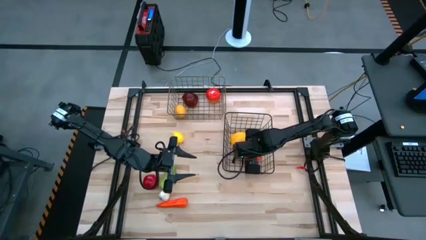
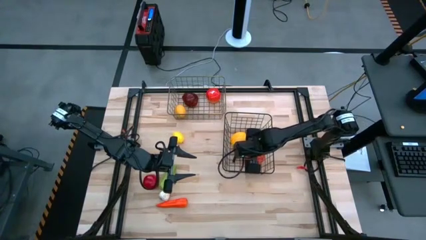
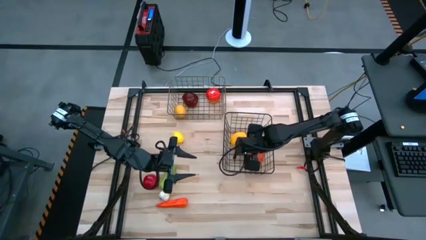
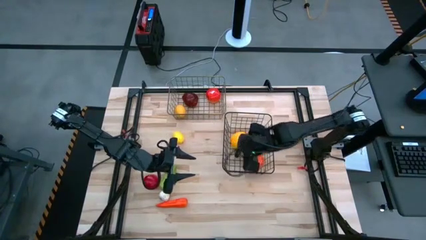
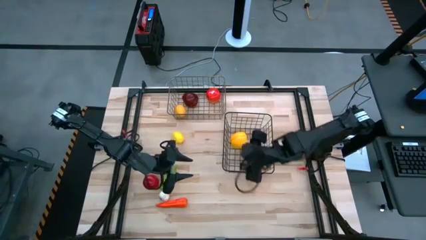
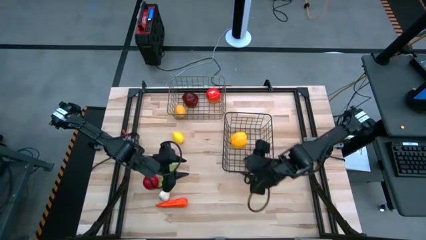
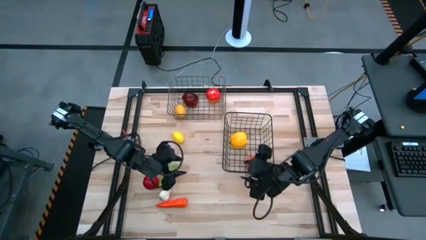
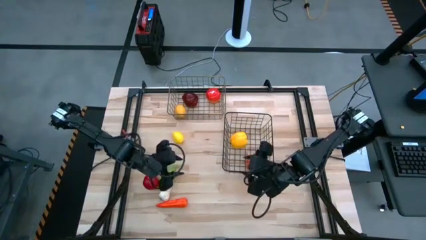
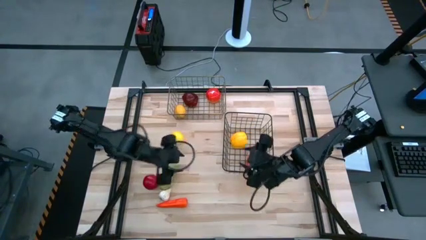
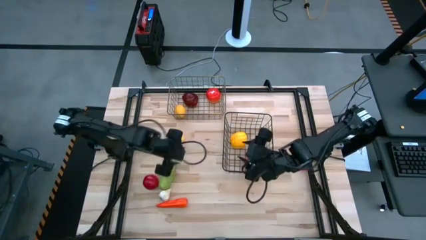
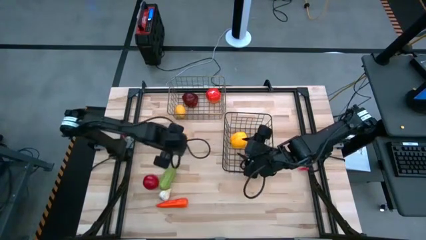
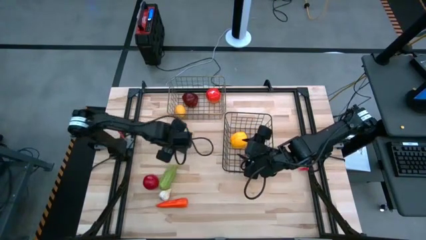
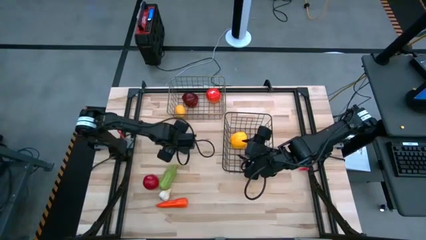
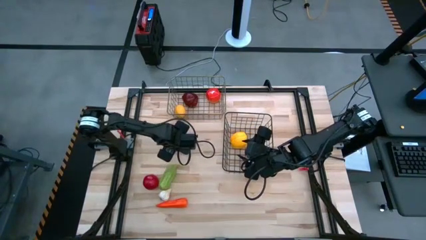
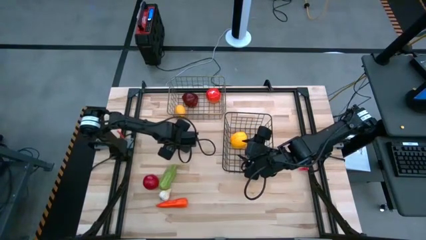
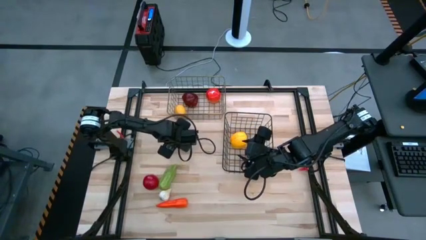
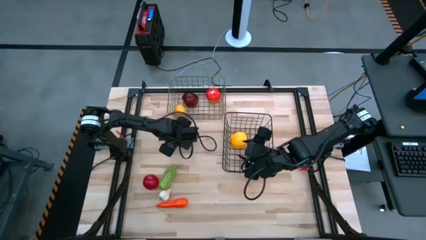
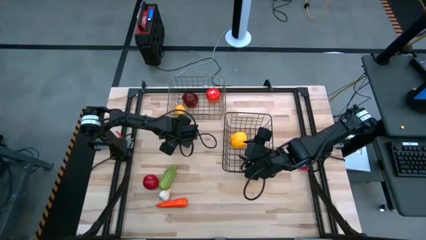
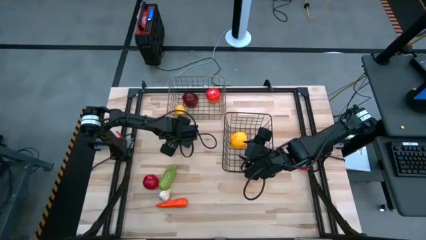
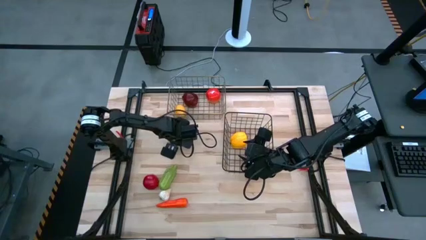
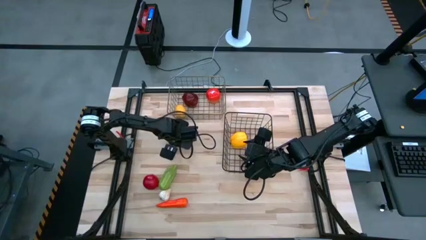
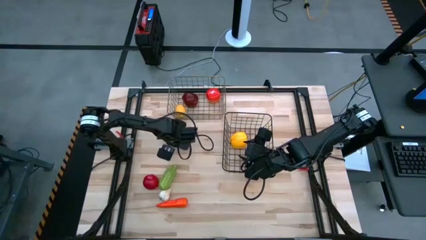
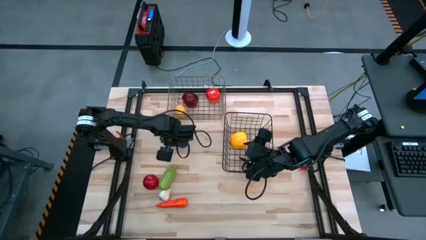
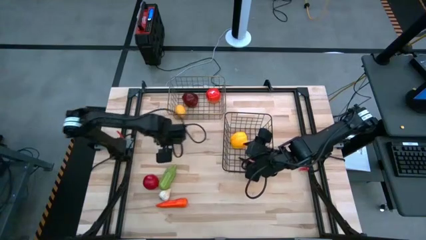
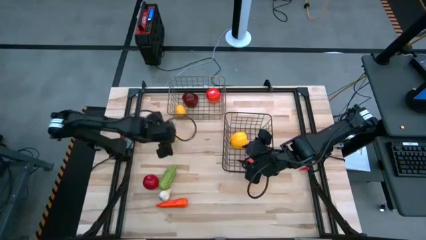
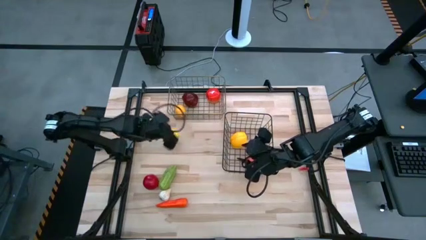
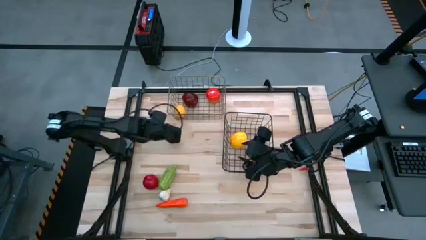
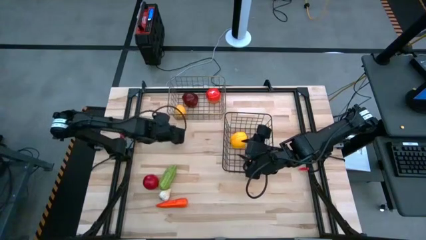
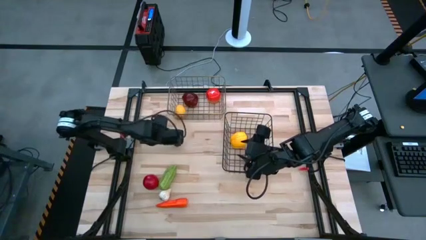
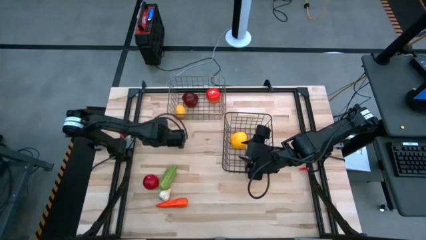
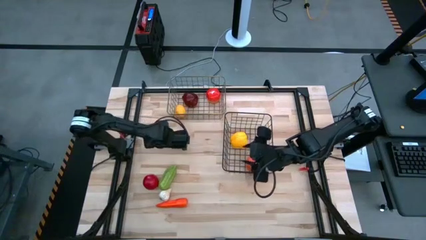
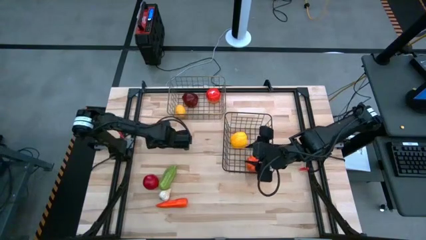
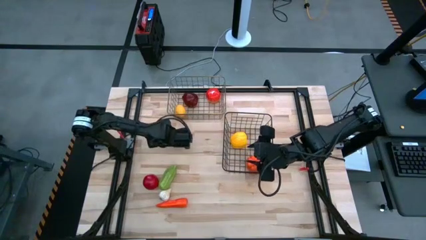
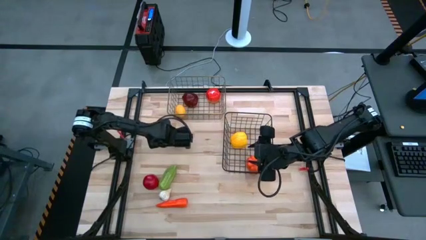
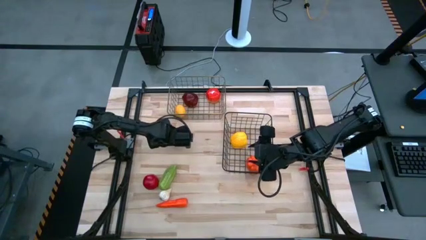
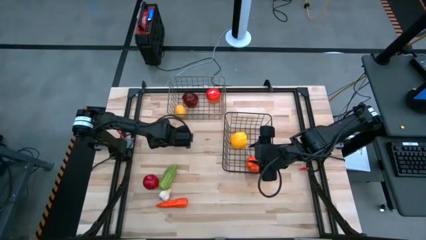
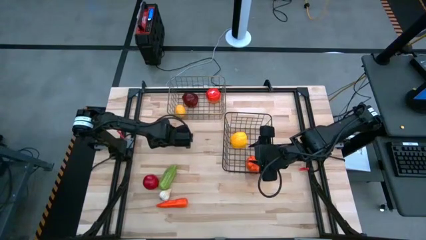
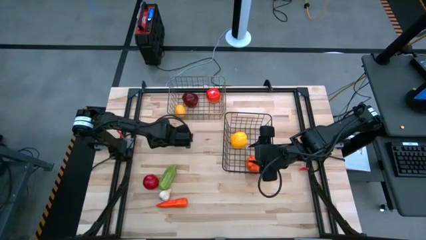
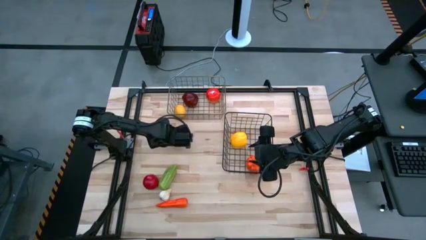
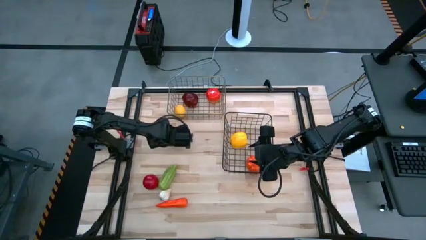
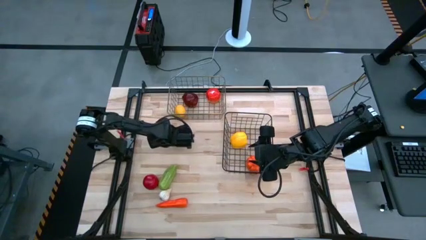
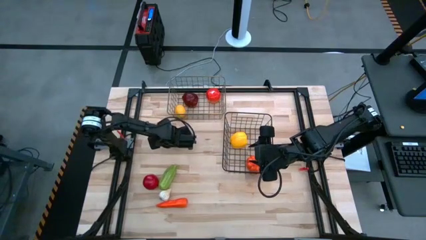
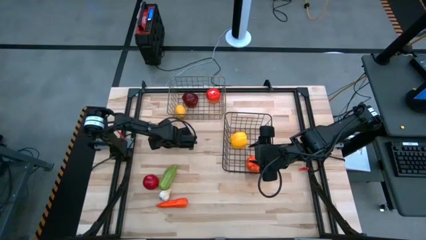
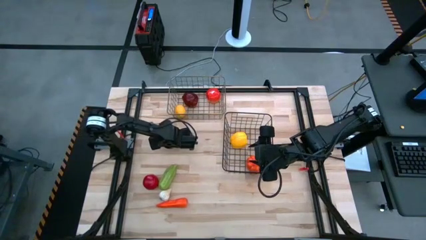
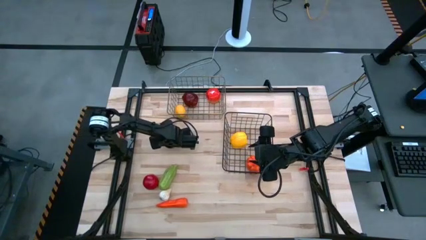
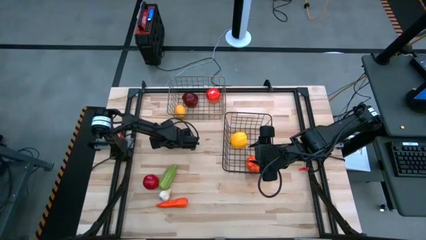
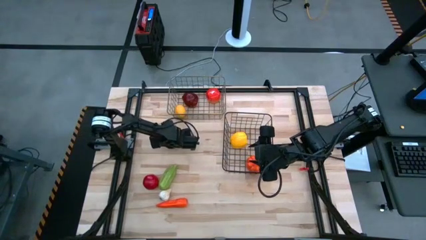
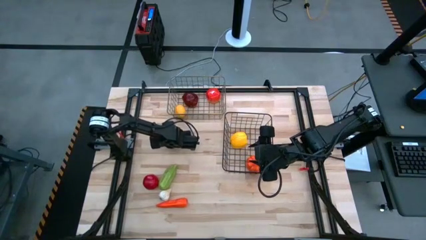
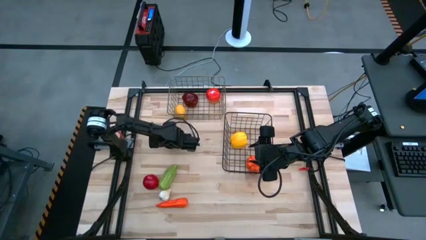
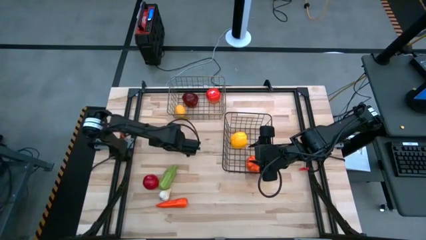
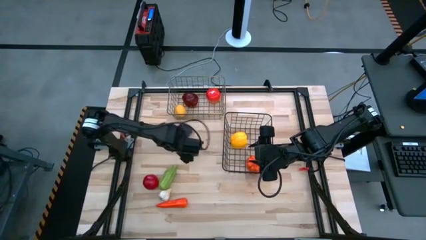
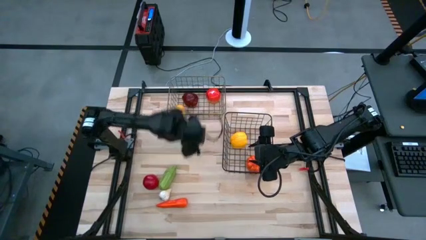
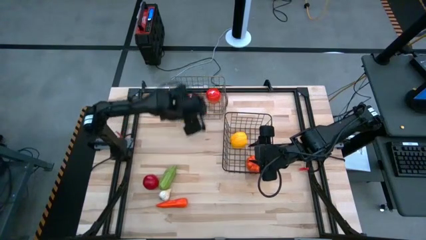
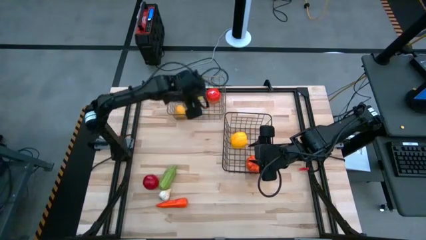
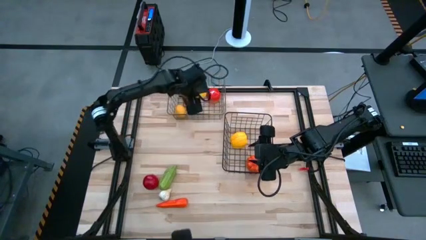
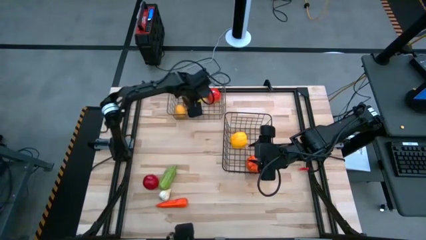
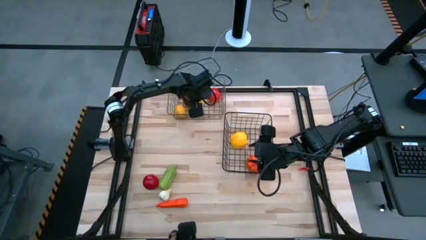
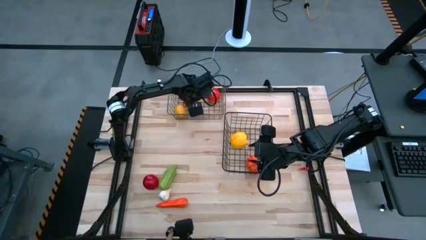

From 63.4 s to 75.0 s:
Task: Sort produce into baskets
Put the yellow lemon into the silver wire basket

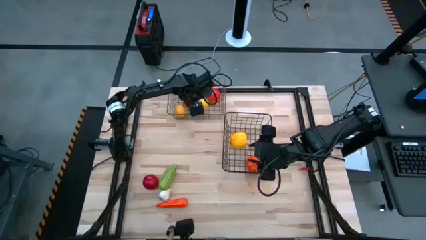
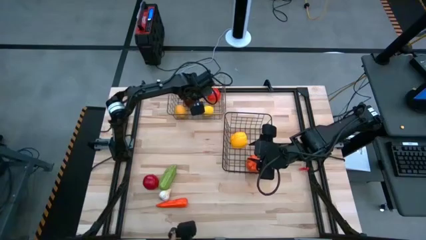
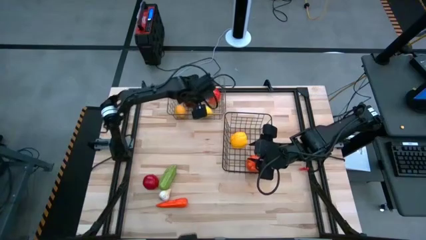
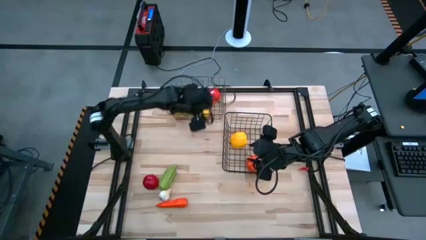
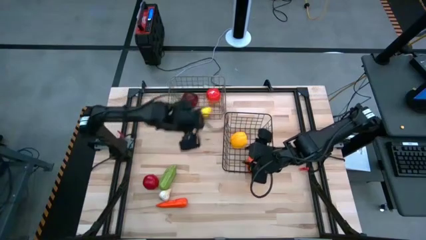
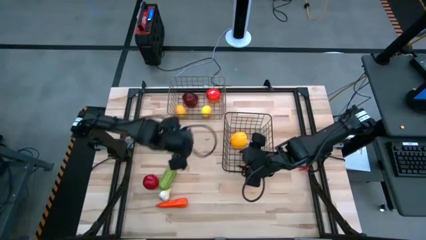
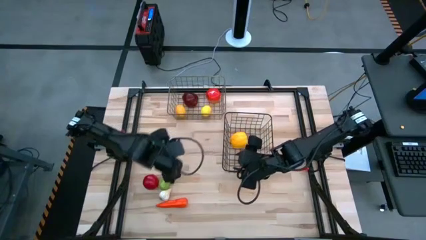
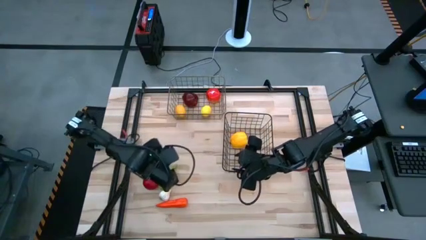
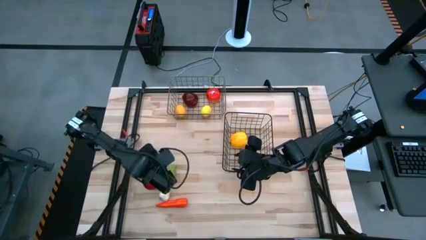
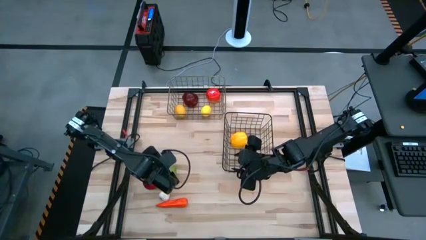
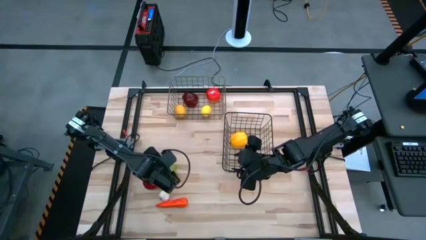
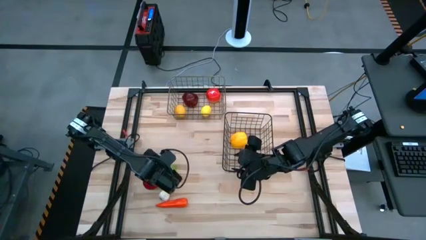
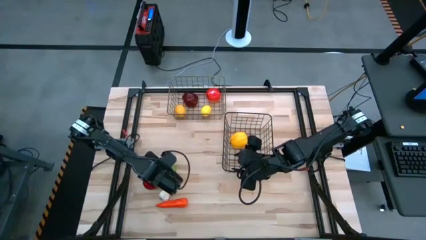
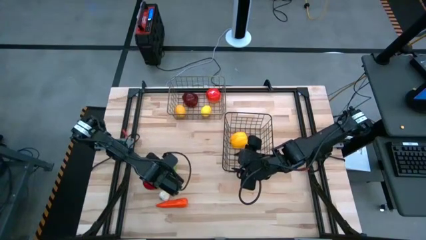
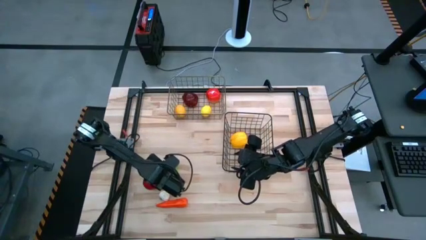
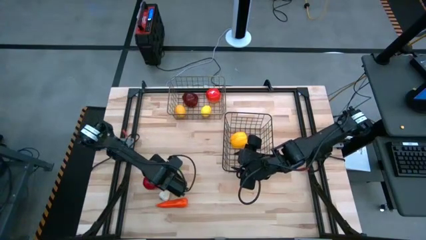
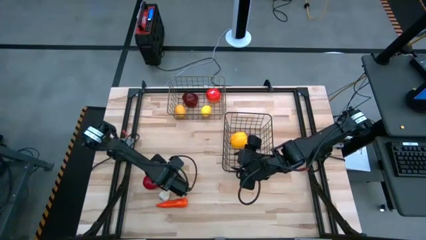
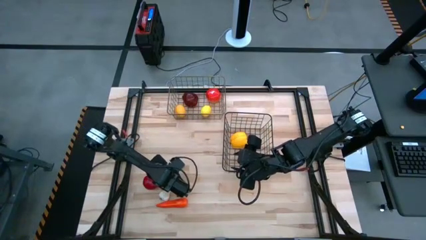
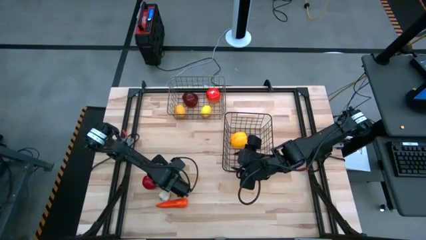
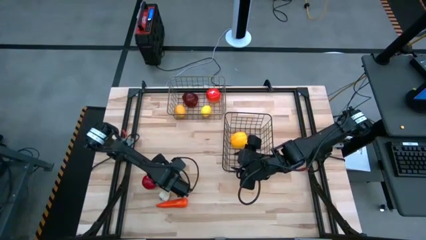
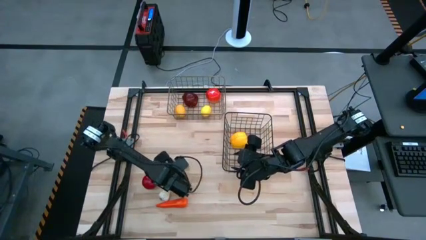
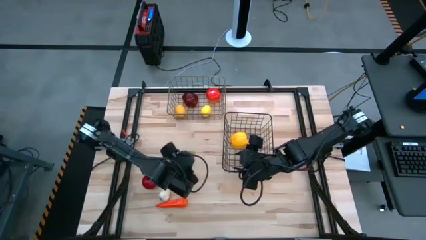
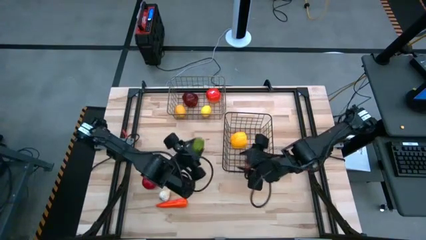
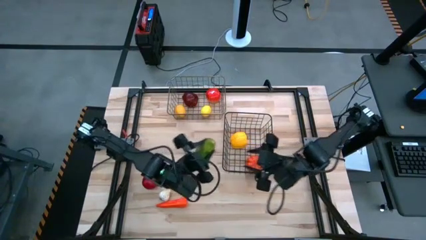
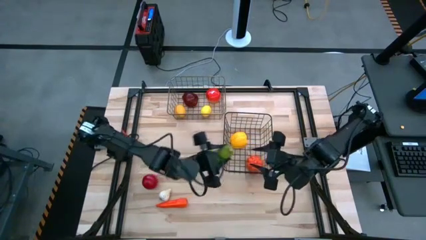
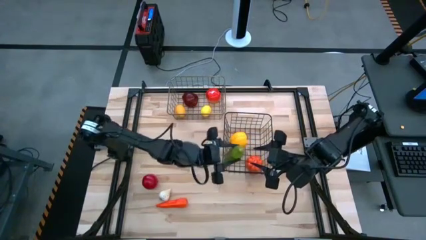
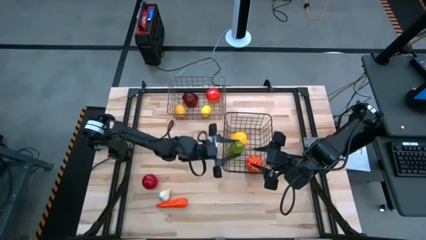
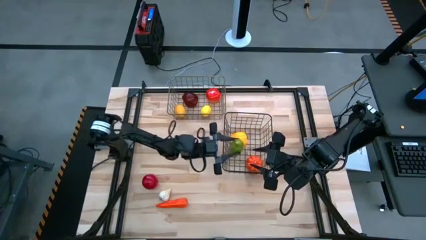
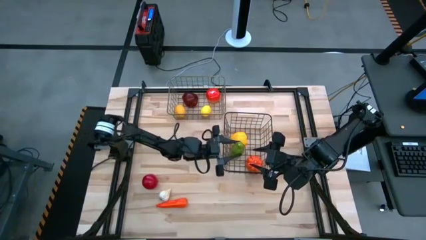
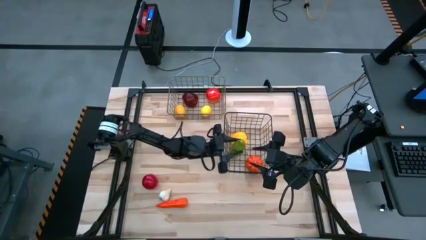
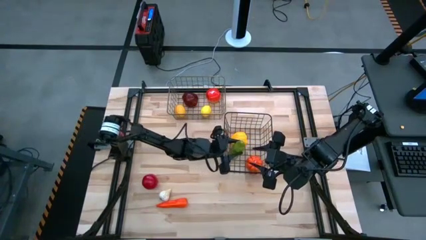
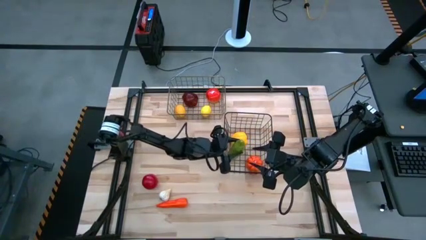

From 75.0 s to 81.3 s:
Put the green bitter melon into the black wire basket
